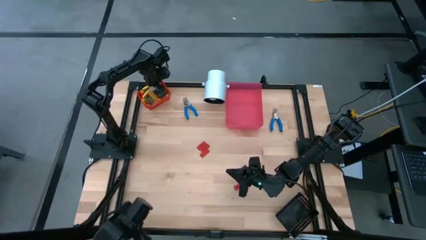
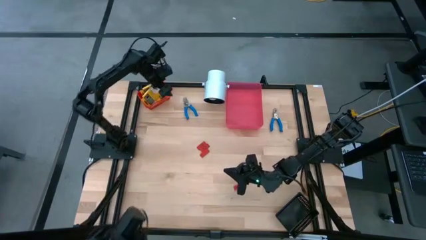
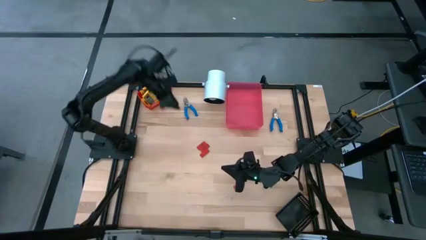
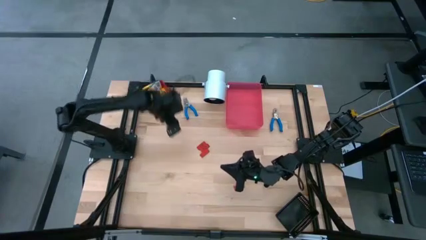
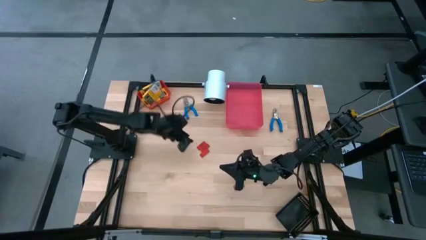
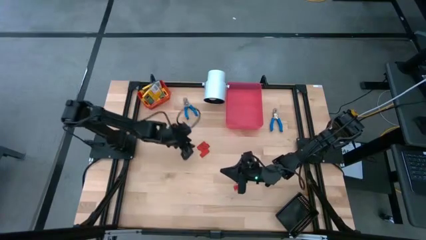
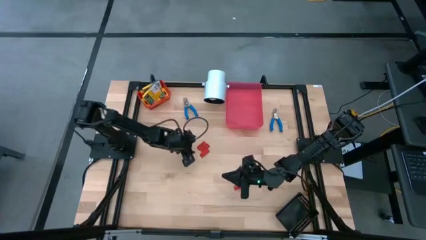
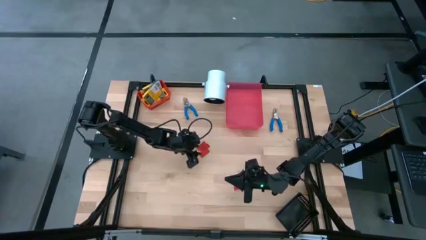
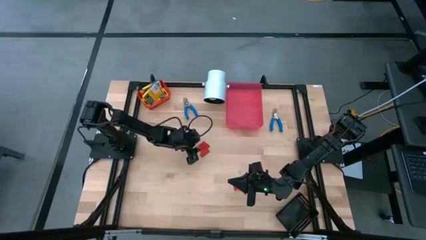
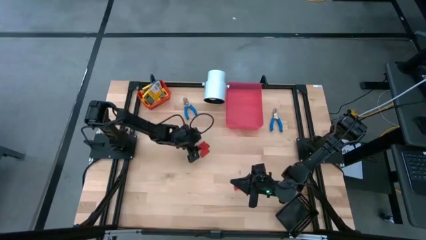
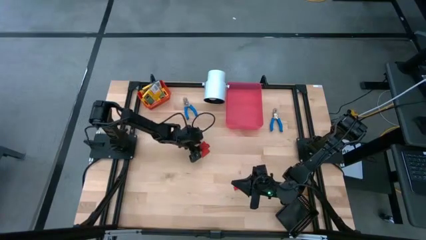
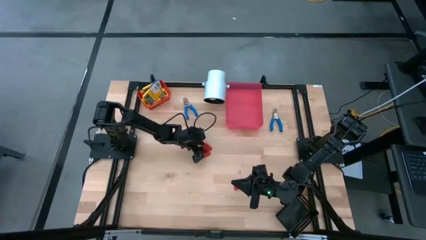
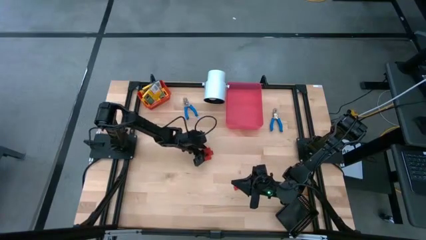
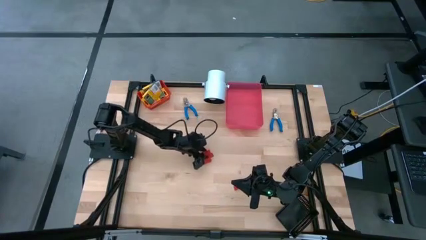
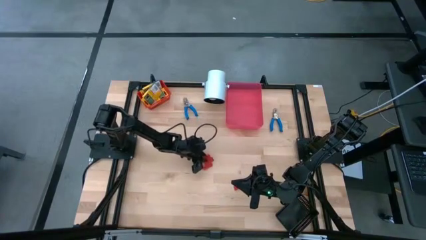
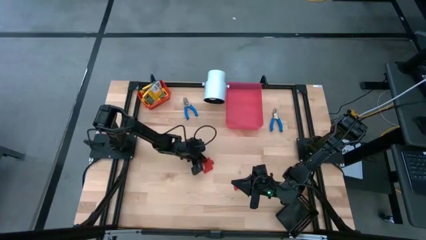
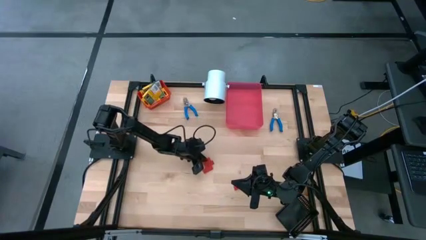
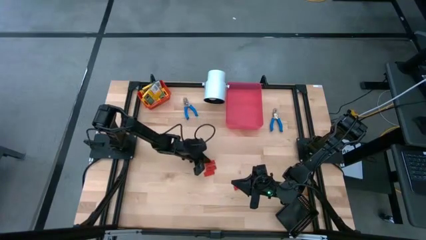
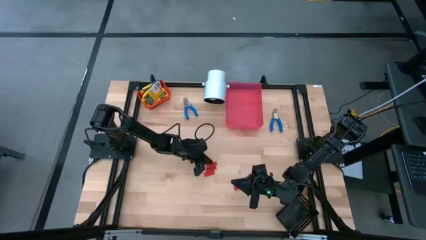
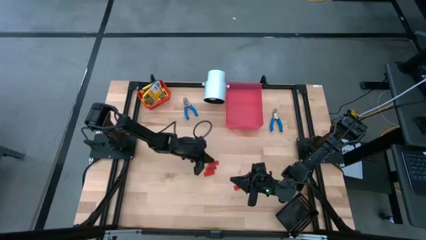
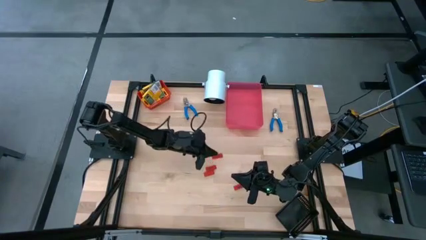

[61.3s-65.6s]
Task: Pick & Place School Supplies
Put the red eraser into the black bin

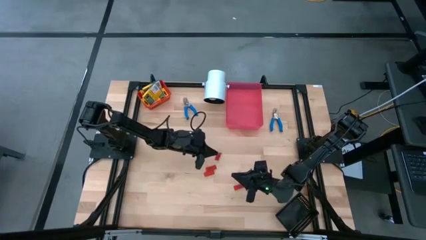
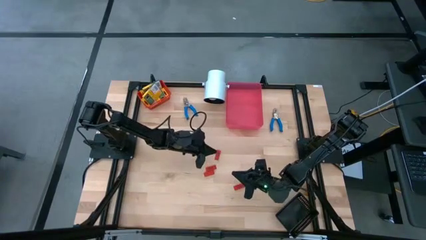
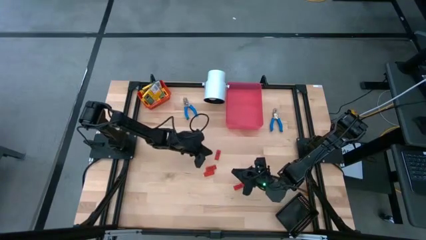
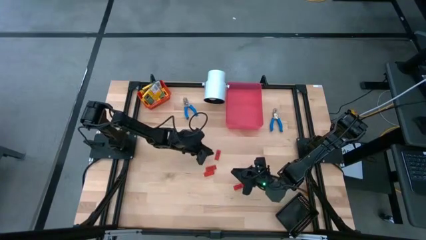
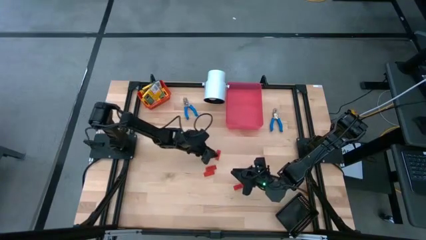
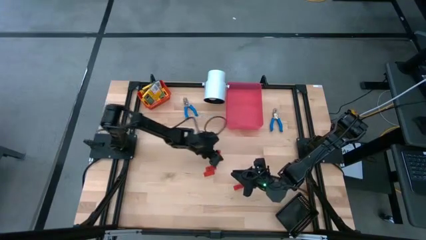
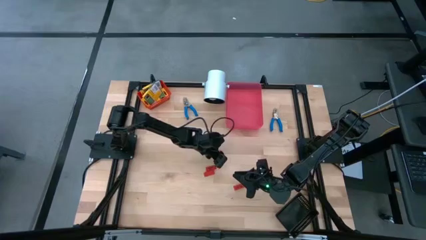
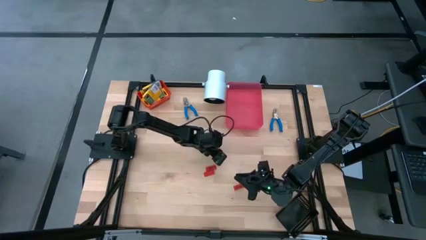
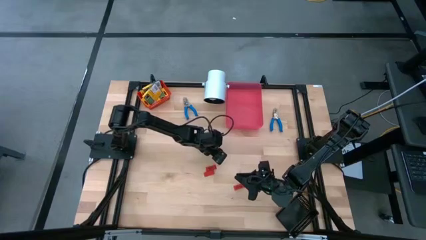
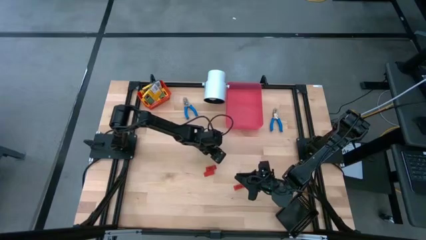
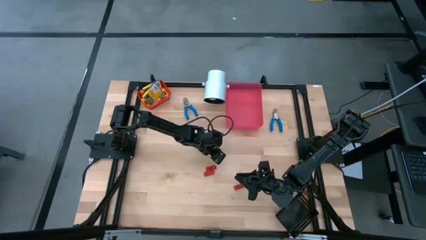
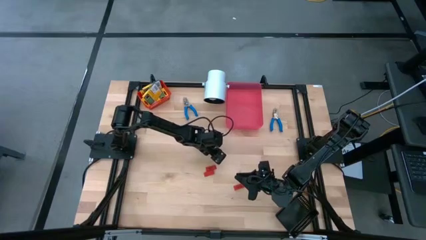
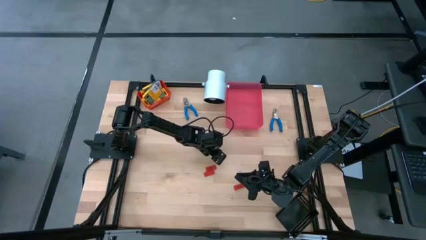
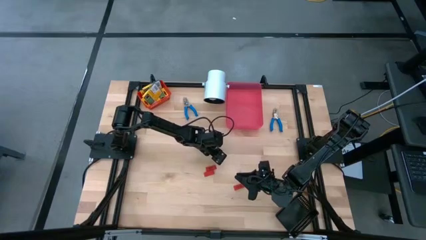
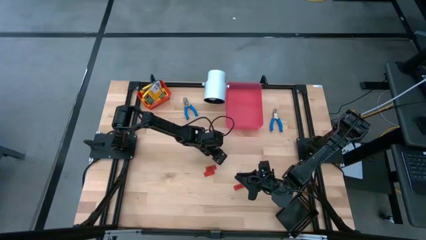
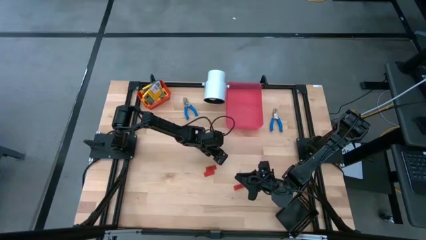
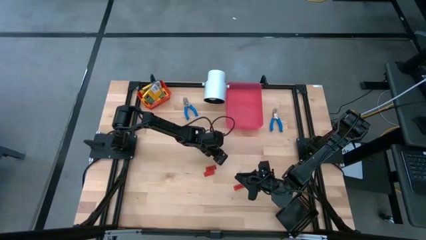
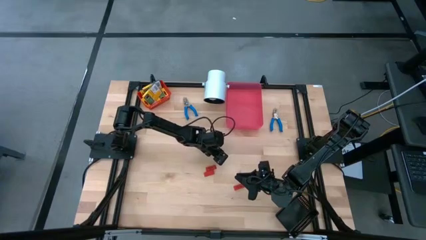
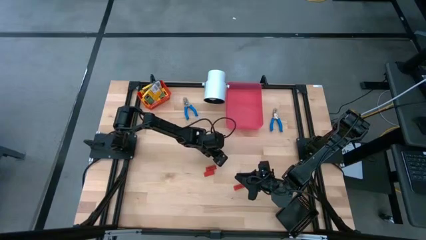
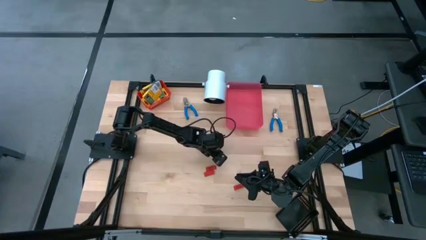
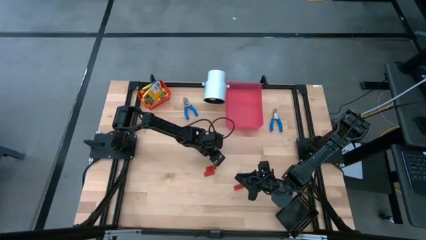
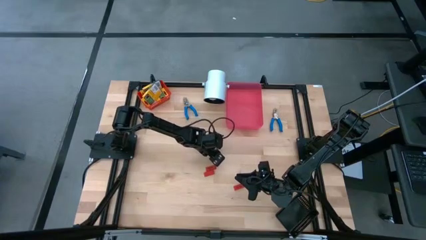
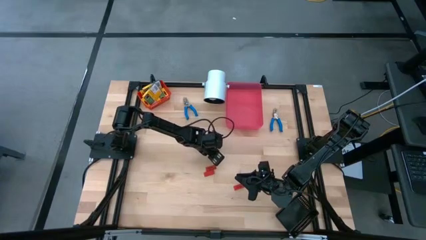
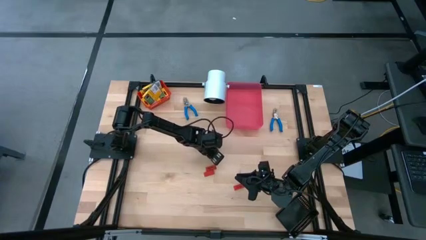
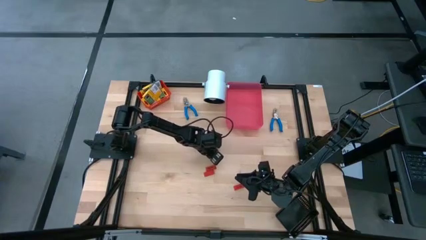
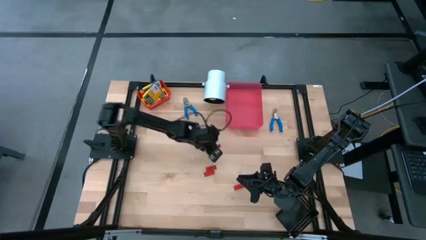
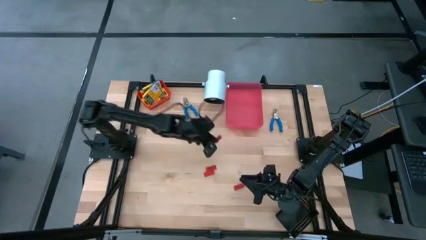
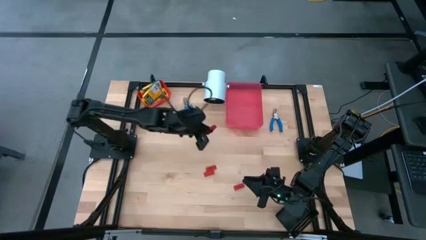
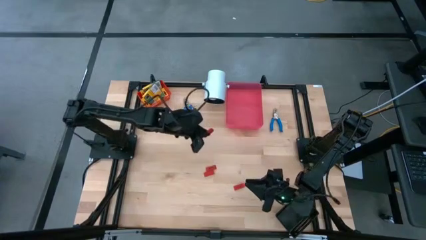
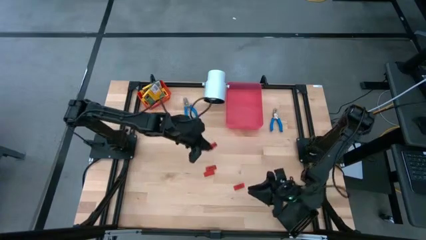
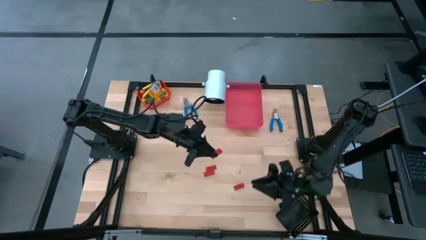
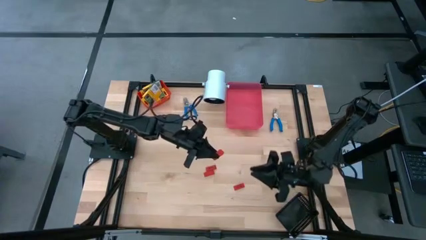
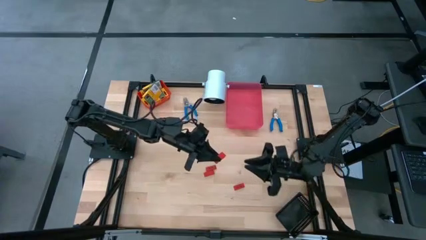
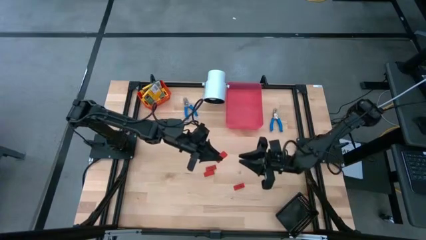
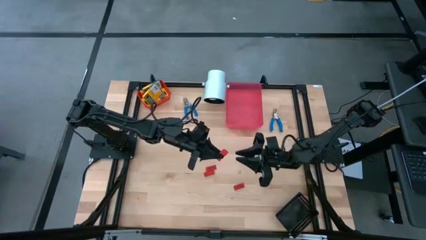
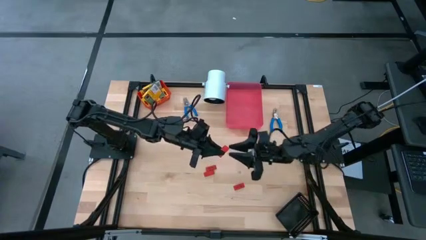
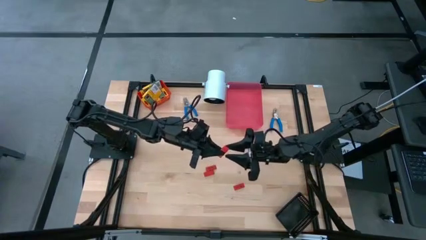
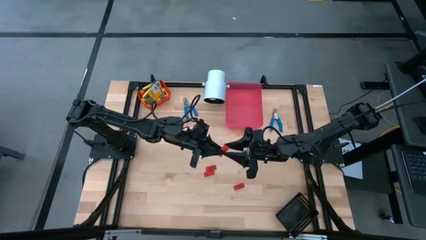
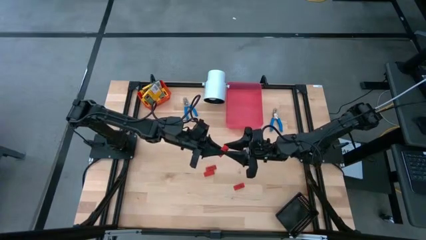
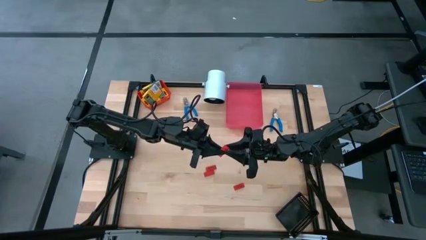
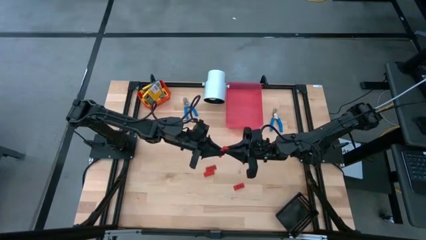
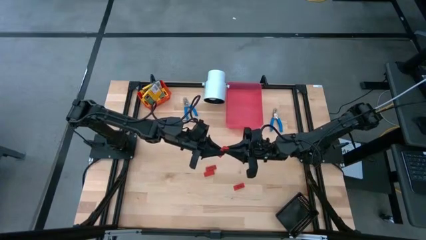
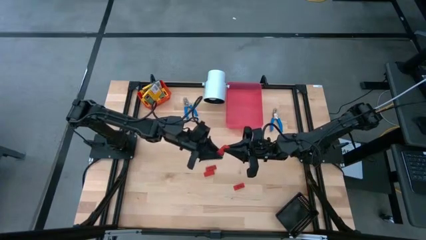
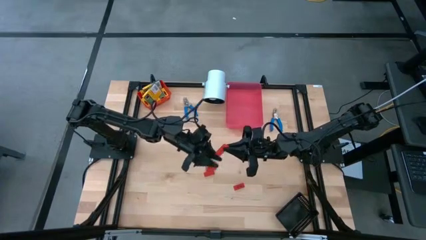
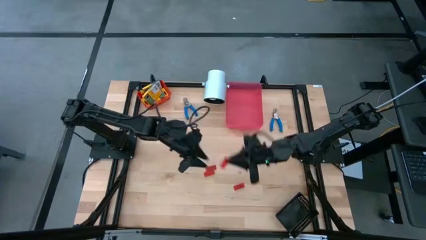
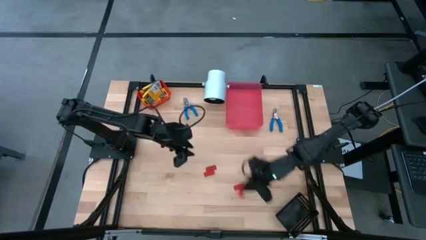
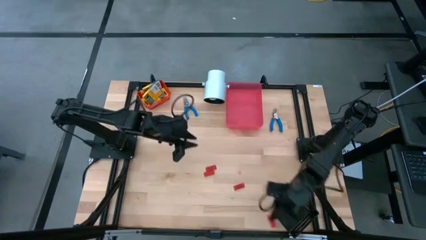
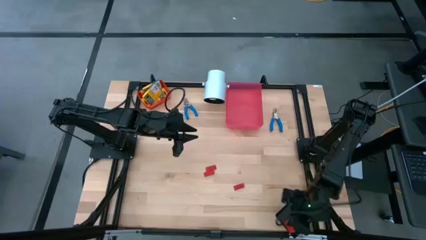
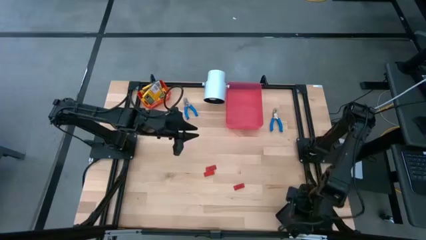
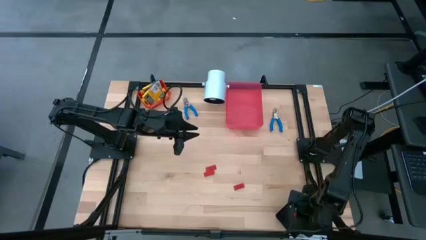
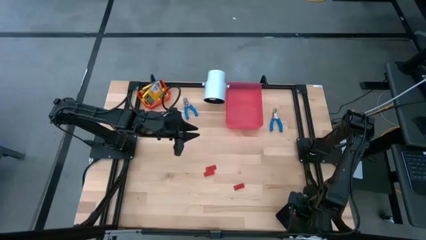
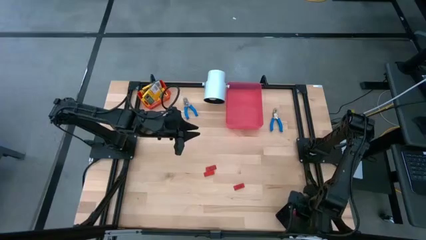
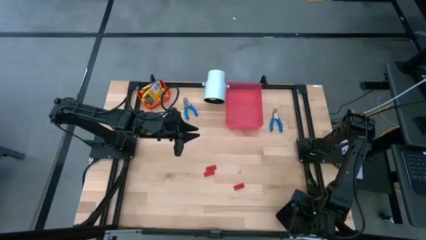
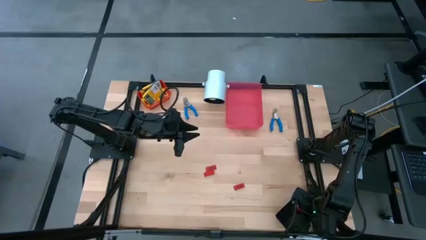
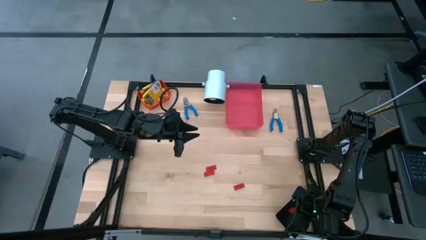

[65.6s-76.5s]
Put the red eraser into the black bin
